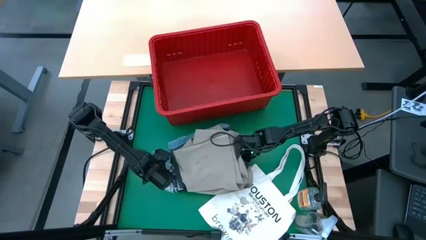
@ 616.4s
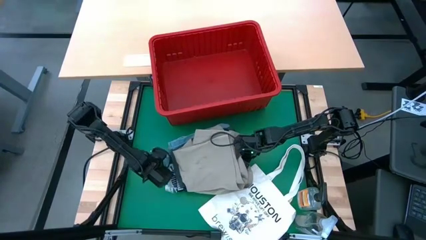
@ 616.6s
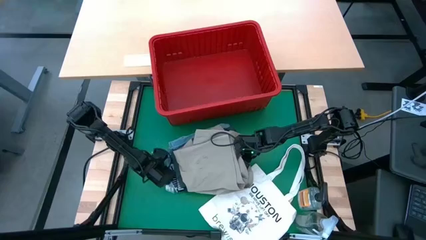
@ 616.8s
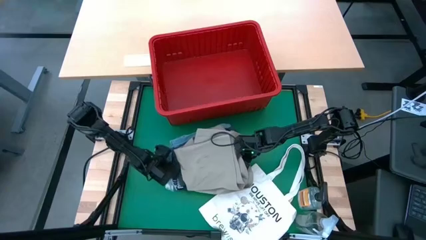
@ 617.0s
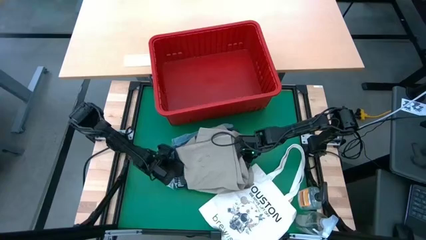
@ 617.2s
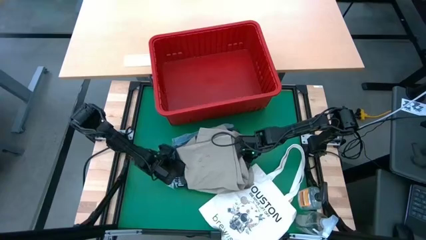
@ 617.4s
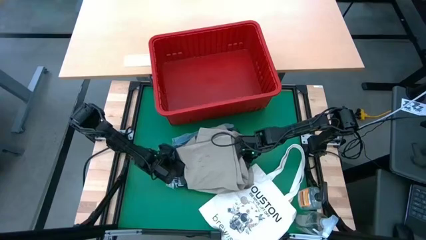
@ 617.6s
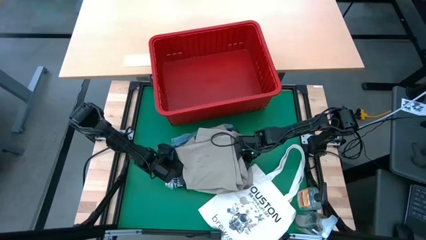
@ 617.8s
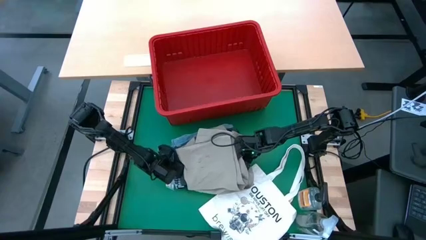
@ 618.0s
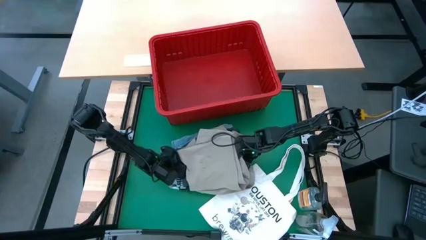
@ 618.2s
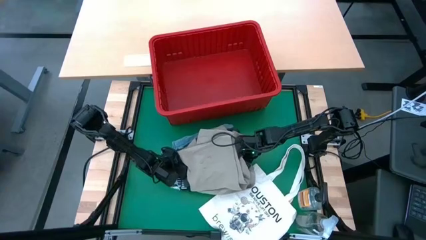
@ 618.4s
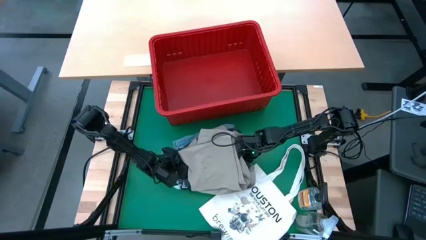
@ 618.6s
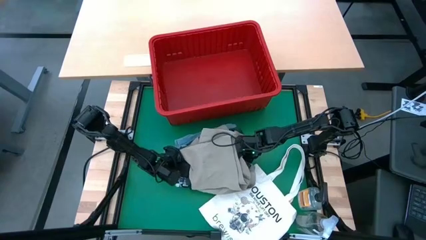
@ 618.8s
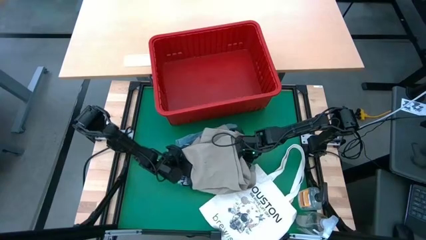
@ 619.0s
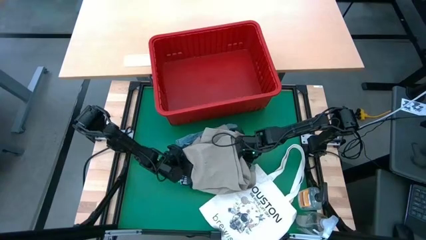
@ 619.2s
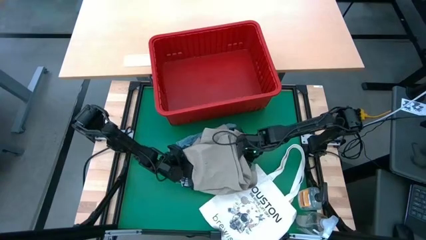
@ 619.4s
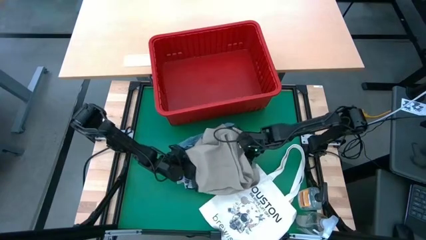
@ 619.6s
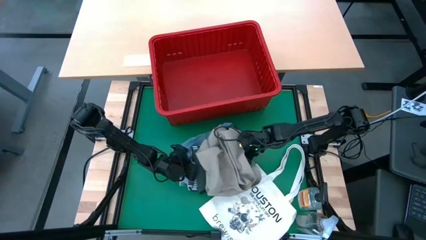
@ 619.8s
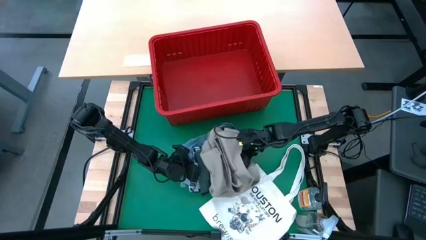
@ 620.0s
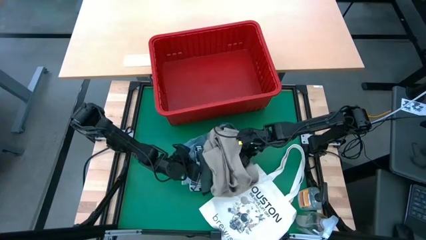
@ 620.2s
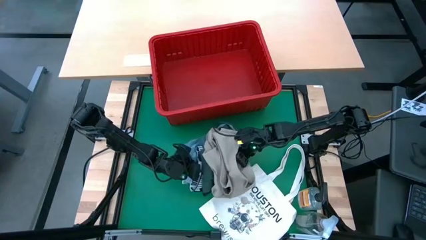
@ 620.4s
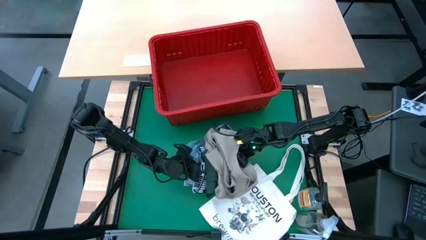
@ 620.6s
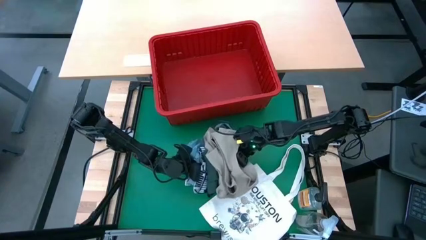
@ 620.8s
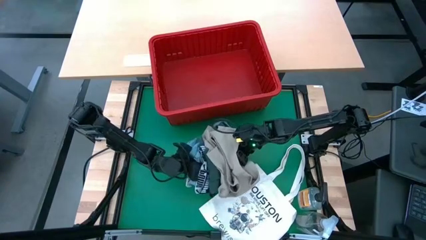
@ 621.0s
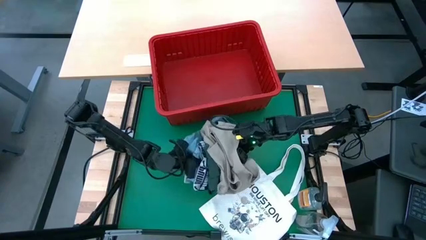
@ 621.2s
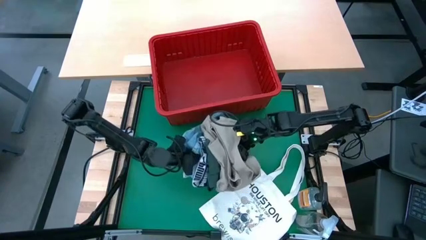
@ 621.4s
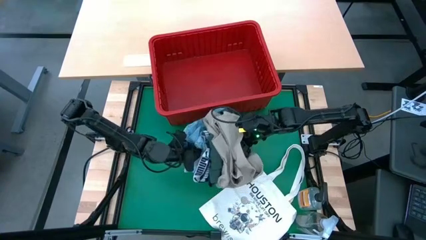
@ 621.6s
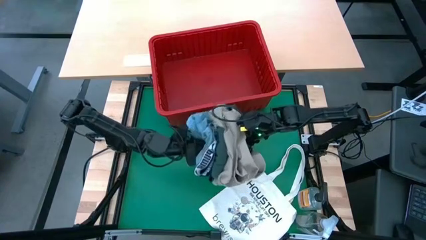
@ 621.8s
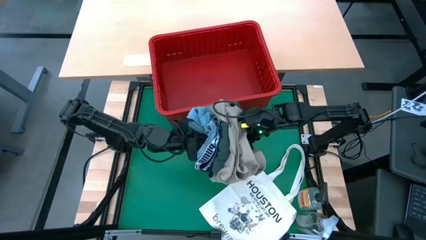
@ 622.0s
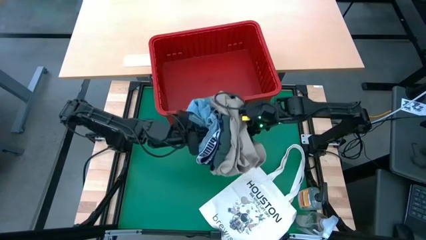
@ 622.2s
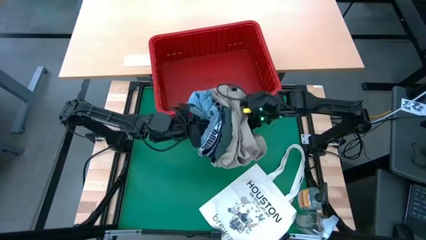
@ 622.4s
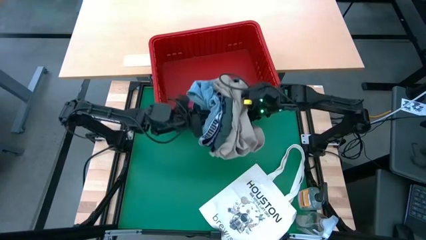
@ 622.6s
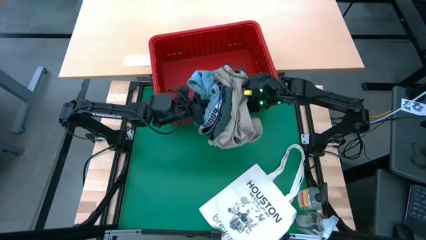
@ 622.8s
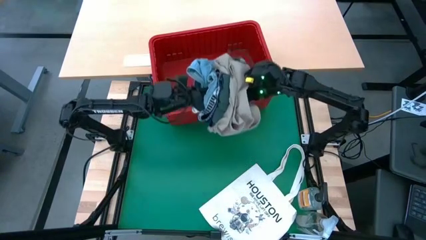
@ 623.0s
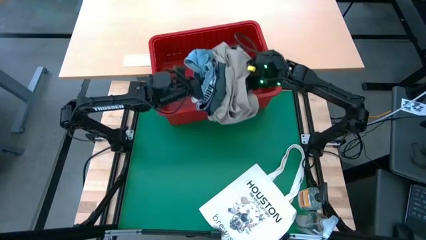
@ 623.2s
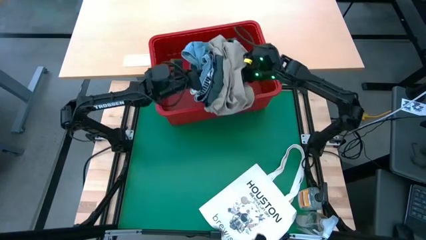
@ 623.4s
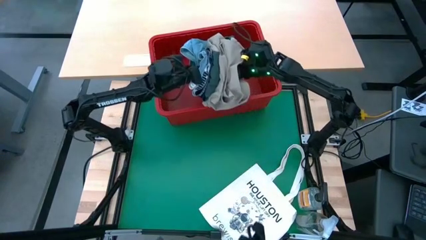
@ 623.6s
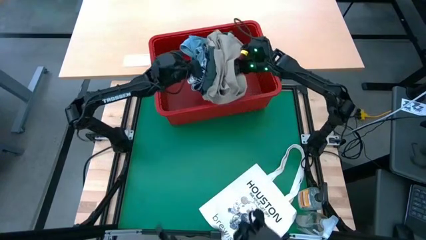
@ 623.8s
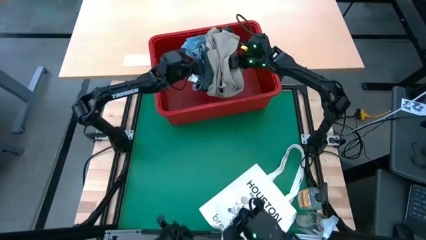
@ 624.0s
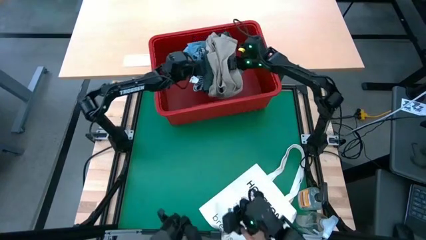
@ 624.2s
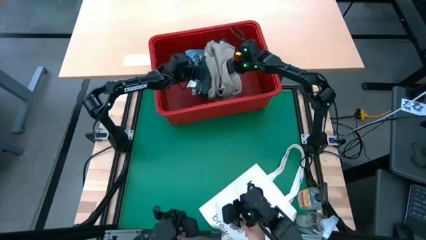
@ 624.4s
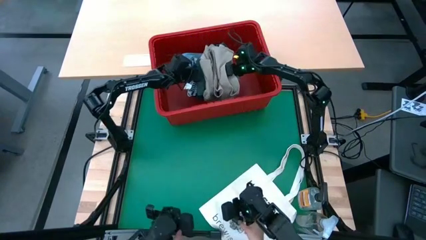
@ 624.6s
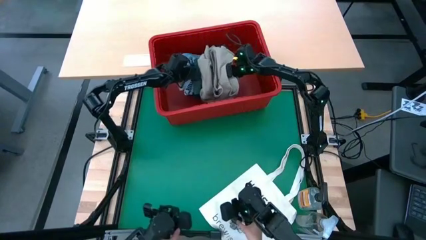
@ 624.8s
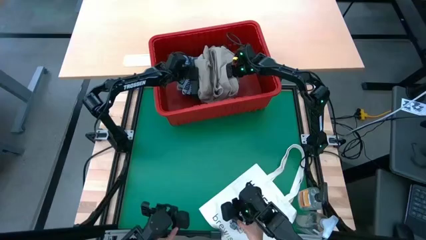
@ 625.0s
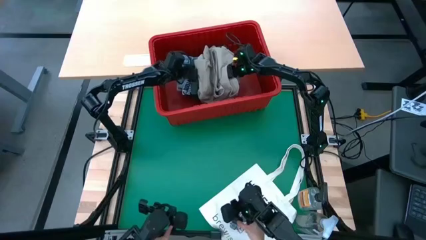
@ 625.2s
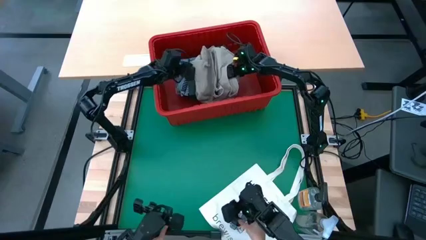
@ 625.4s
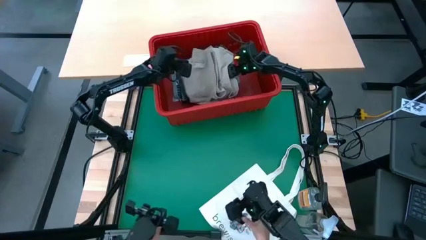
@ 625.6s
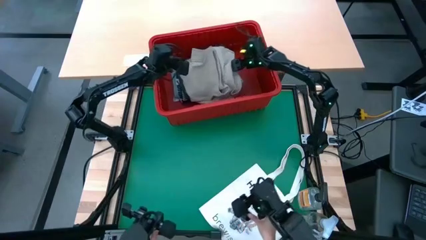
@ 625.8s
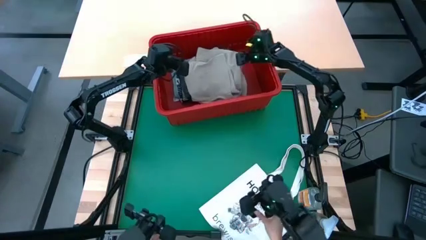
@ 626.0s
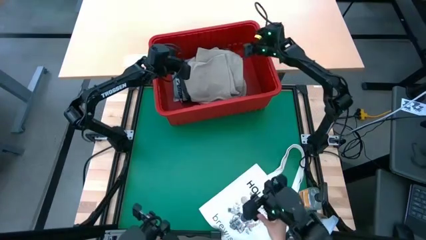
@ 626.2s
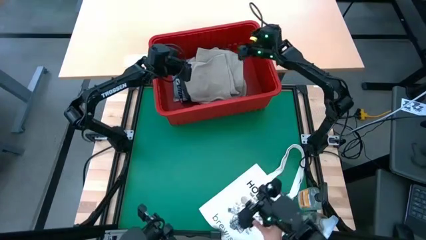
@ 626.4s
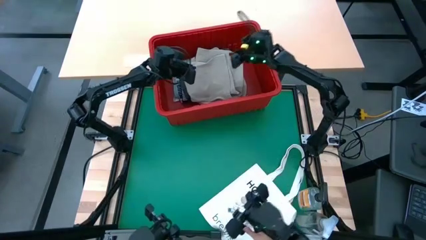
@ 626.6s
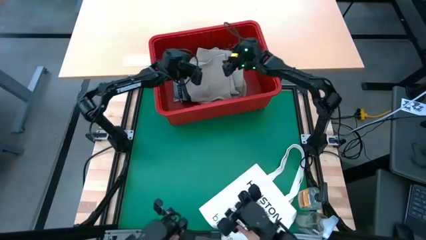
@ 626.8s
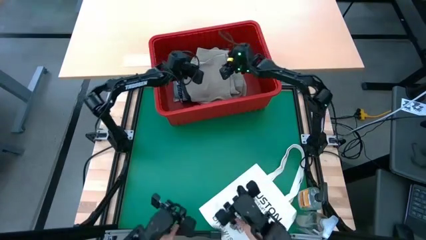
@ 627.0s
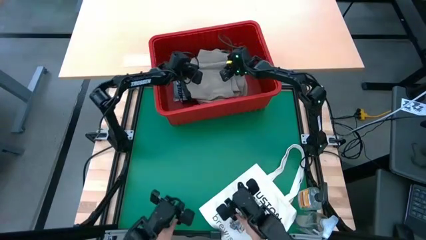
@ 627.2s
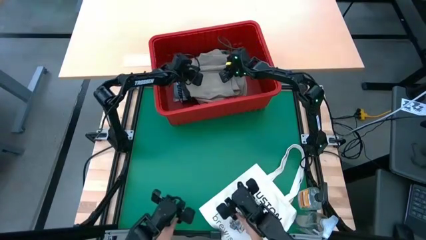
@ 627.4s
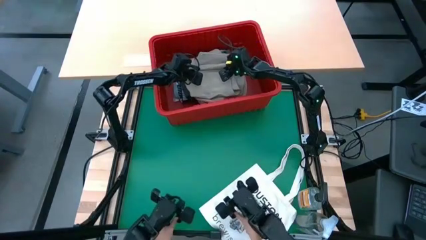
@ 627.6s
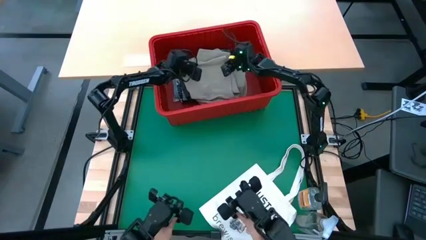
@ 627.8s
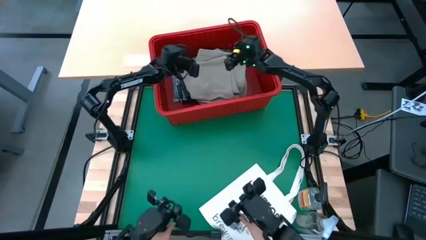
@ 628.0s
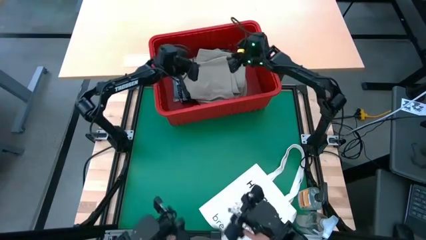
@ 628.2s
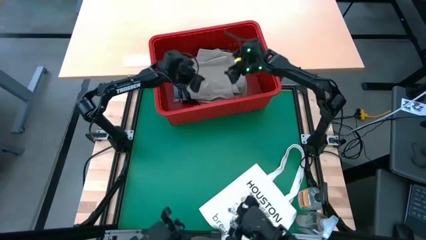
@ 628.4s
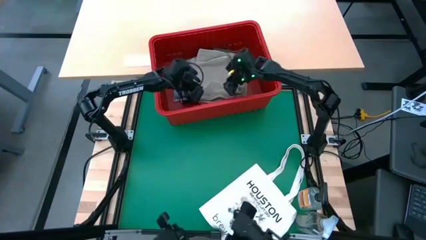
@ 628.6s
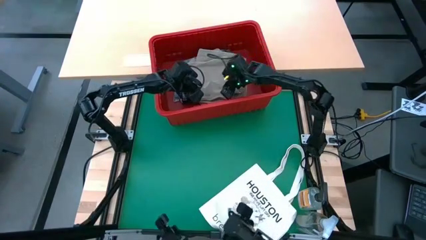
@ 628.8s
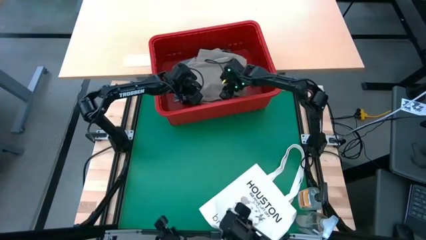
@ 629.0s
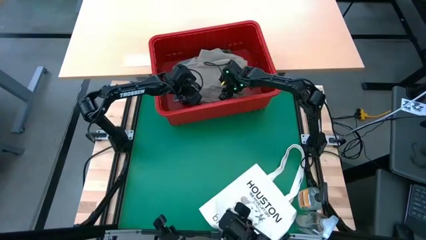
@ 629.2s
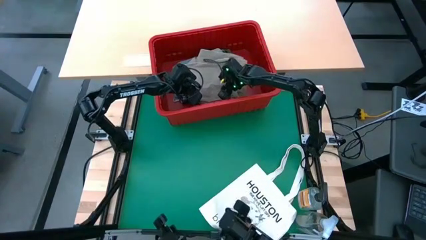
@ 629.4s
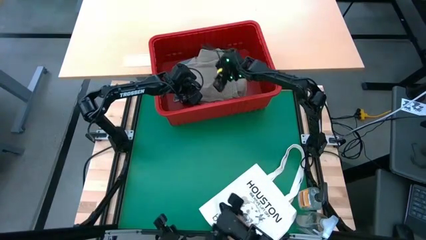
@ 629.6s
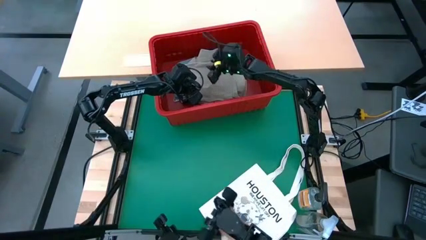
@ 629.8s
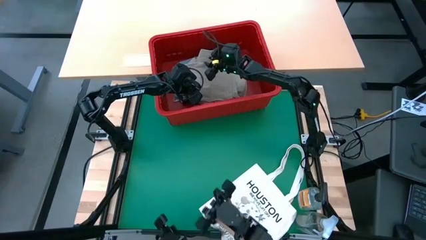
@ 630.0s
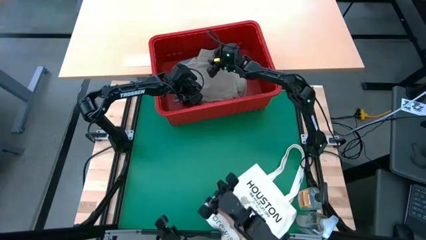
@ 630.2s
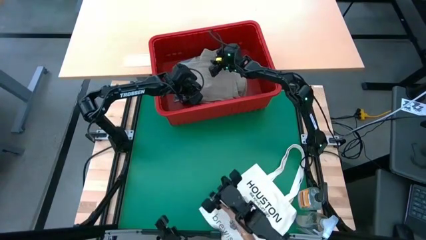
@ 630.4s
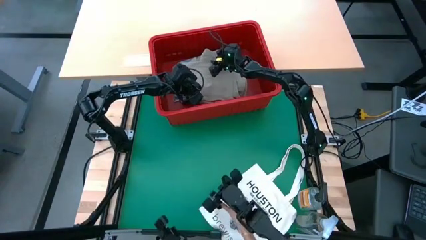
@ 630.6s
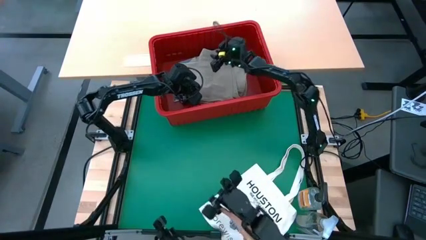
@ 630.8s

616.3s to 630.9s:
Task: Fold Laundry from Bin
Put the stacked clothes into the red bin

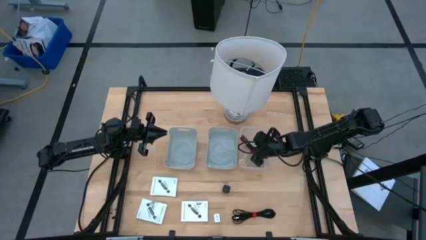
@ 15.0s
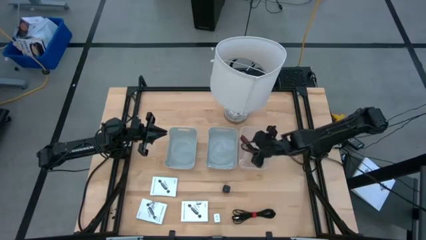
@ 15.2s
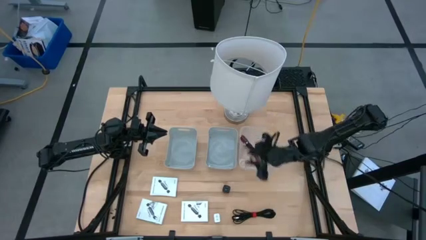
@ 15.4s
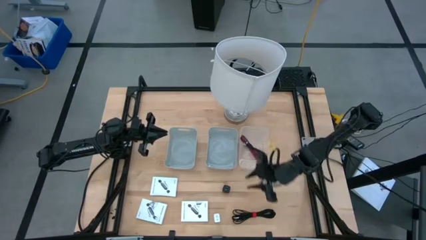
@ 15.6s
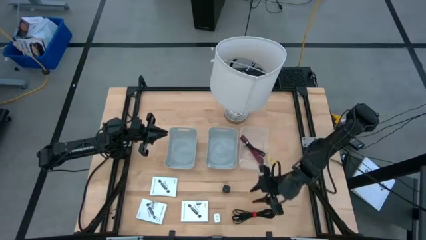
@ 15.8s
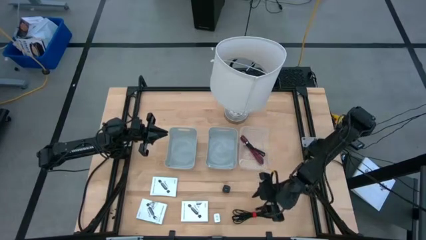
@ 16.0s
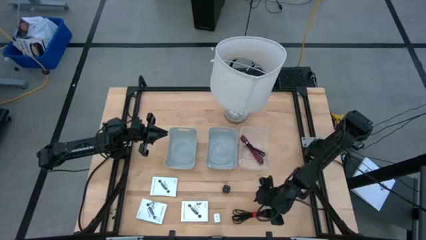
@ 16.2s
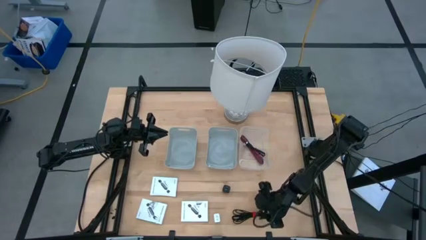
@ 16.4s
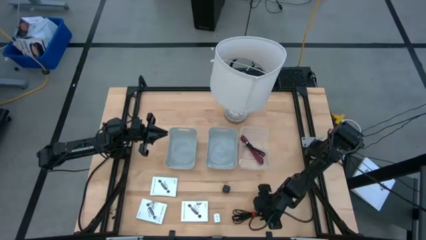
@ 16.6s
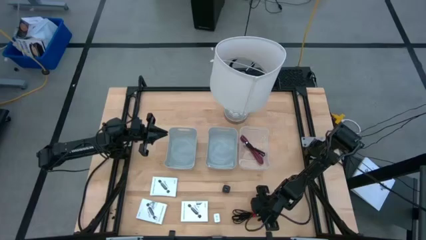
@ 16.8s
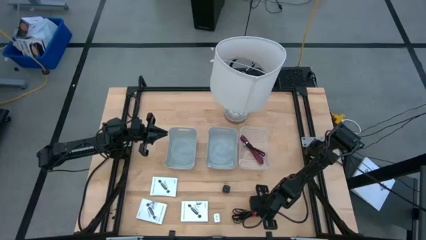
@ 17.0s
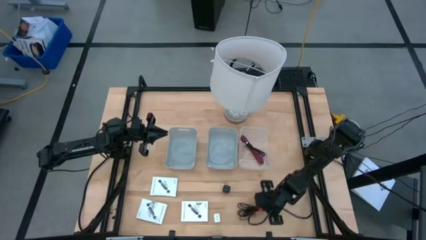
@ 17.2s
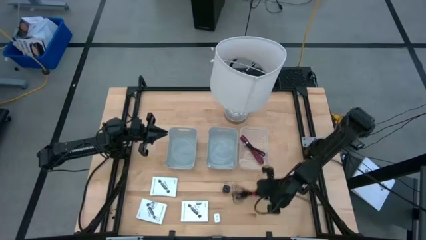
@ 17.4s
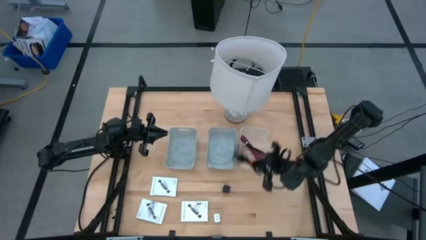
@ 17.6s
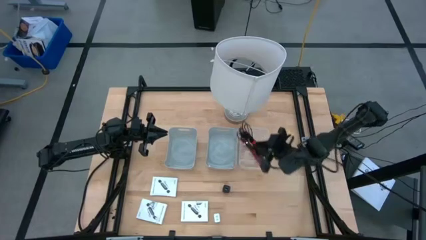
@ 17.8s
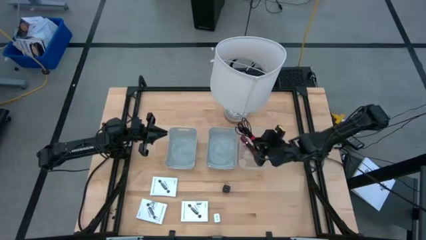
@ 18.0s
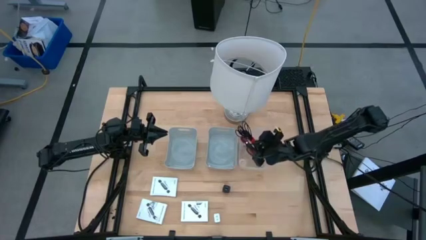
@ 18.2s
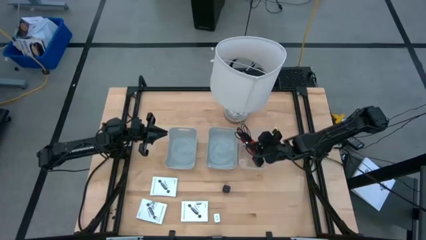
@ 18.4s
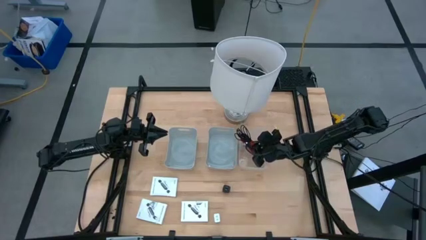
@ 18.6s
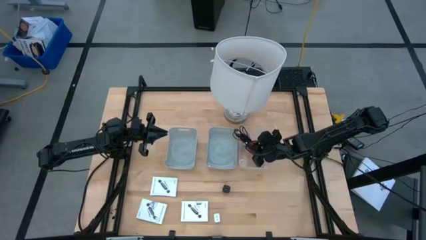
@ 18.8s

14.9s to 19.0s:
Task: Pick and place items into bin
Put the black charger cable into the transparent bin
